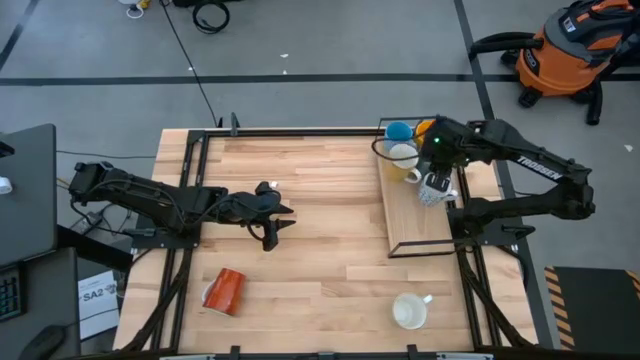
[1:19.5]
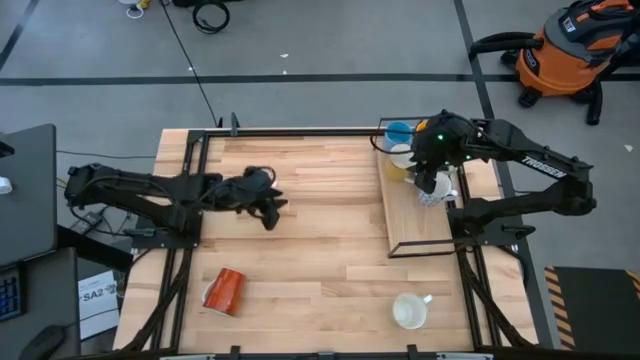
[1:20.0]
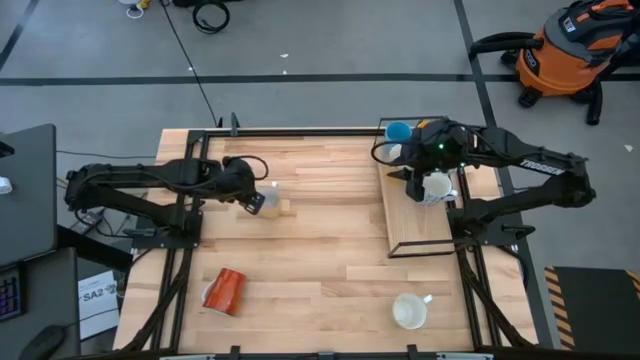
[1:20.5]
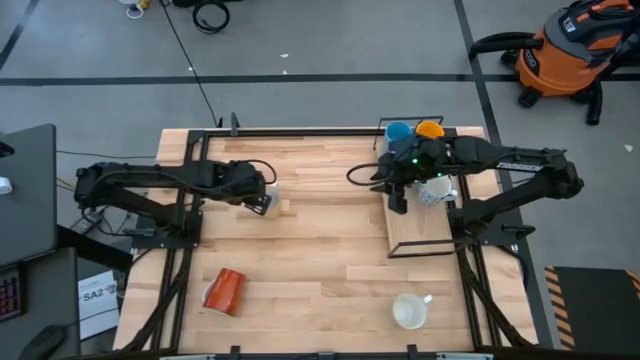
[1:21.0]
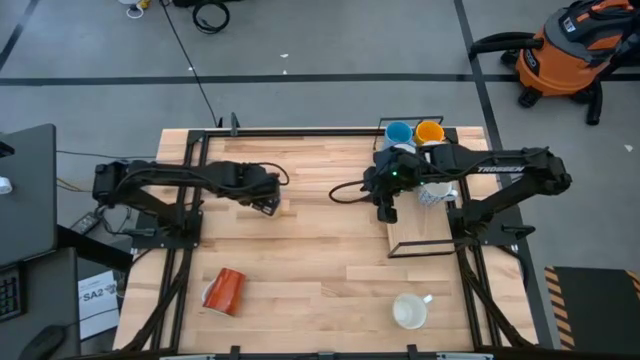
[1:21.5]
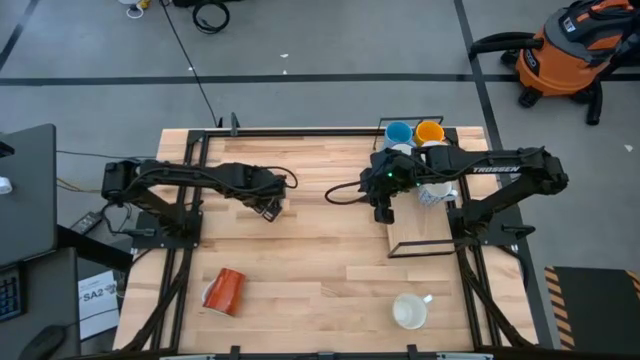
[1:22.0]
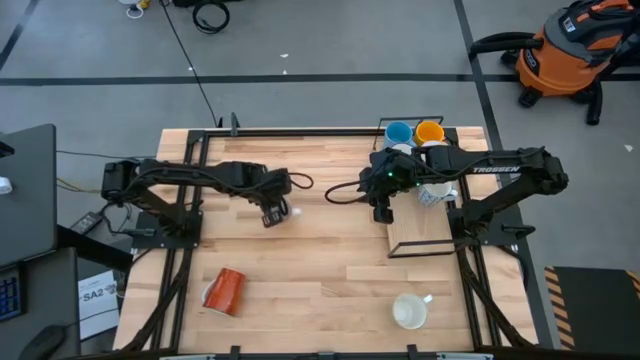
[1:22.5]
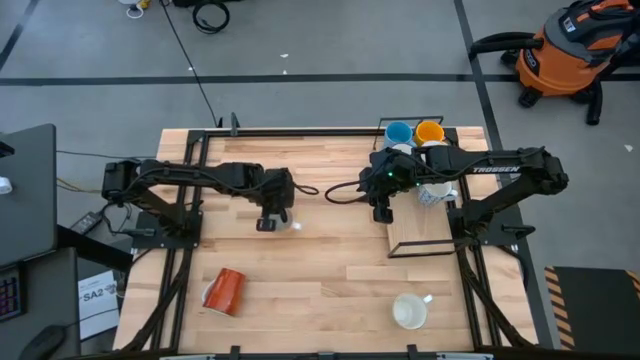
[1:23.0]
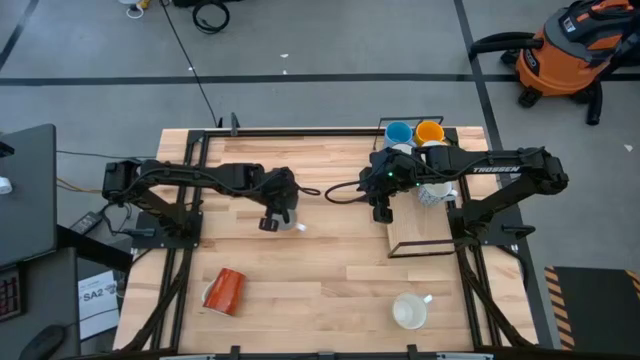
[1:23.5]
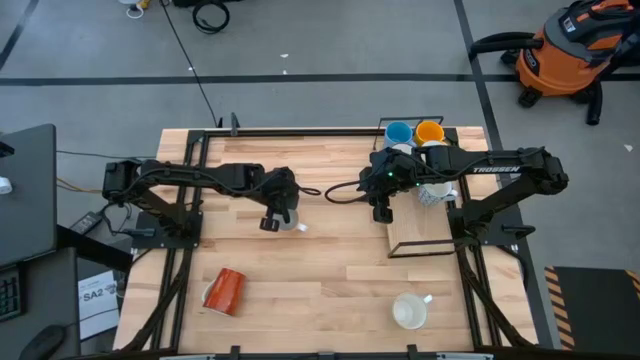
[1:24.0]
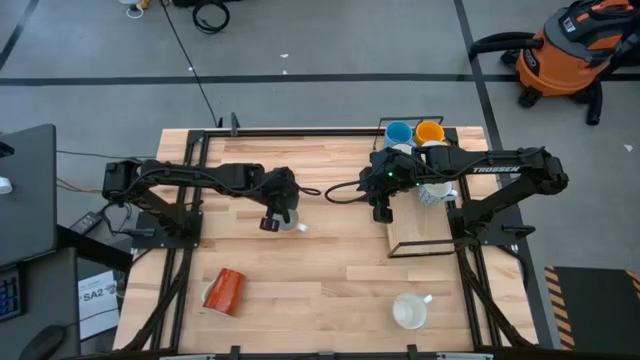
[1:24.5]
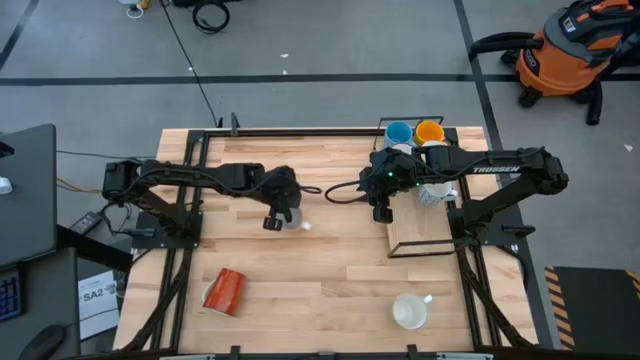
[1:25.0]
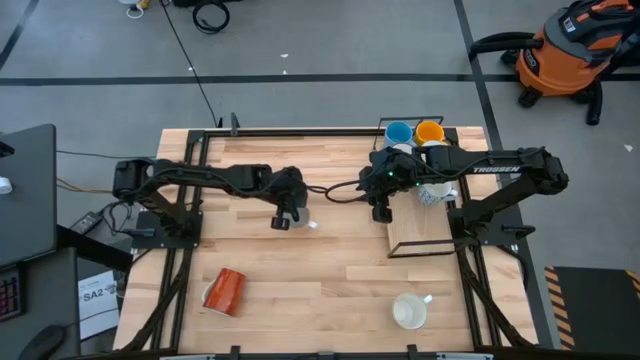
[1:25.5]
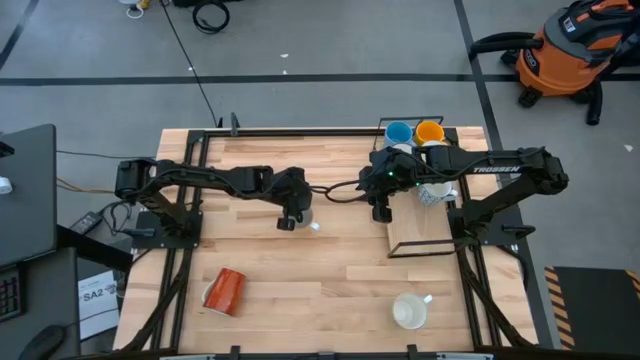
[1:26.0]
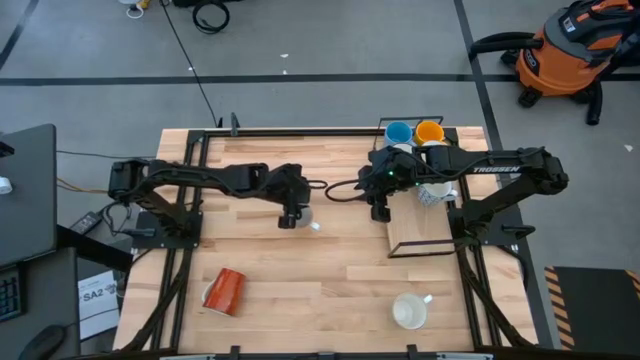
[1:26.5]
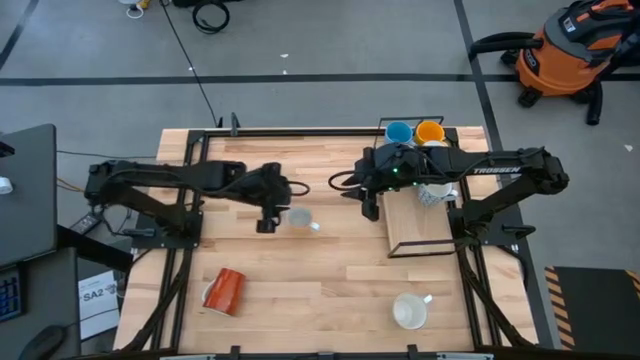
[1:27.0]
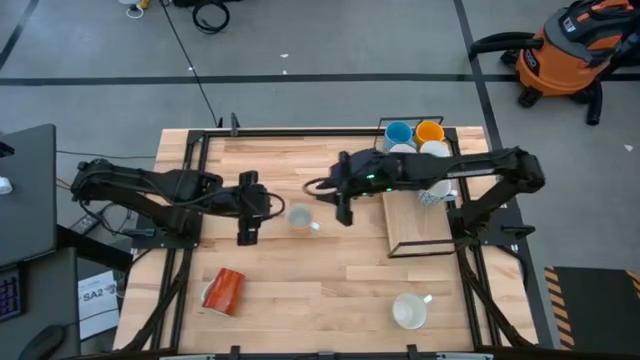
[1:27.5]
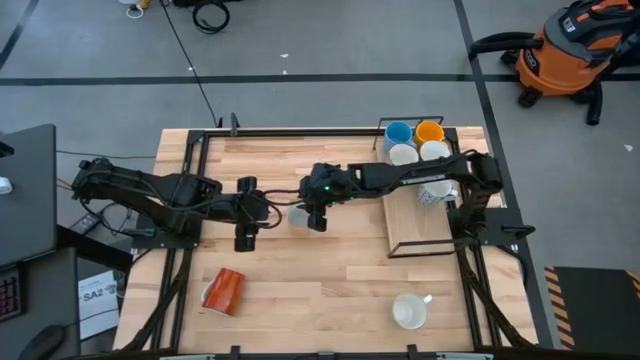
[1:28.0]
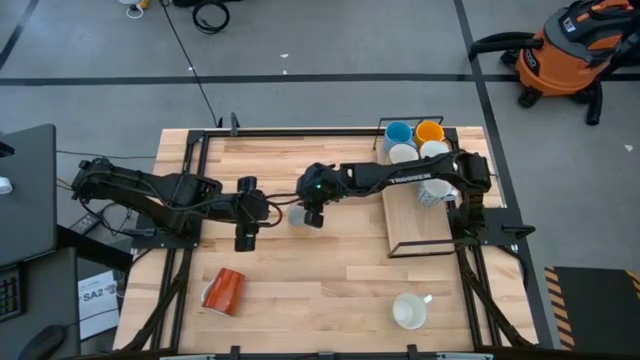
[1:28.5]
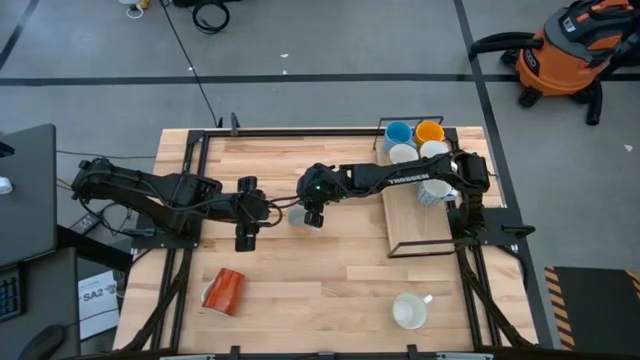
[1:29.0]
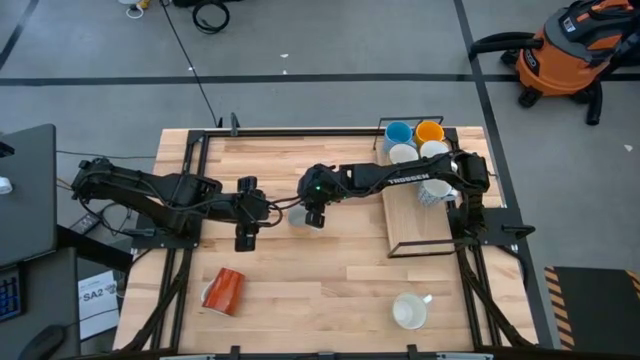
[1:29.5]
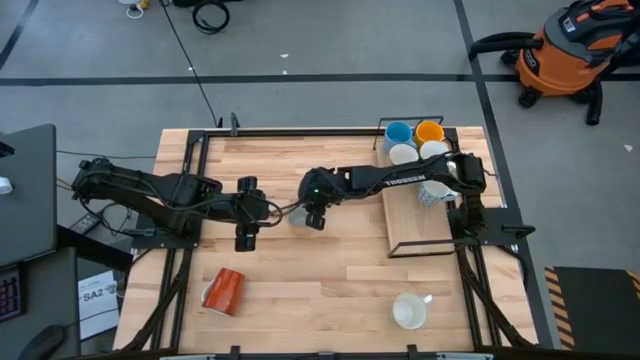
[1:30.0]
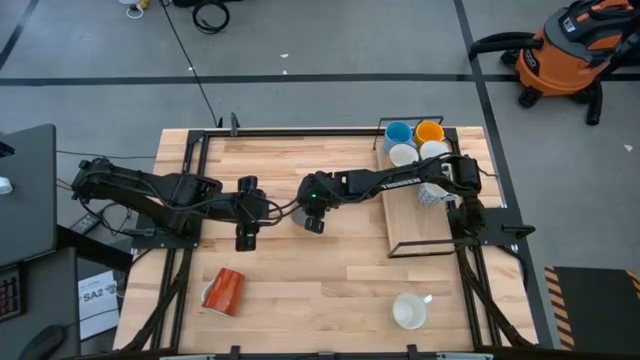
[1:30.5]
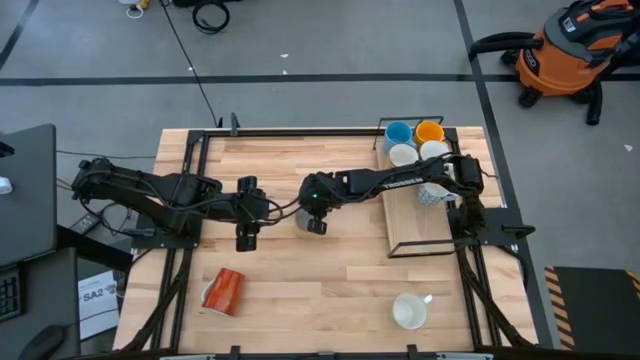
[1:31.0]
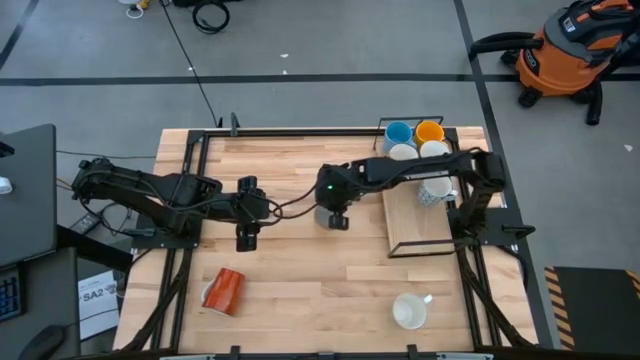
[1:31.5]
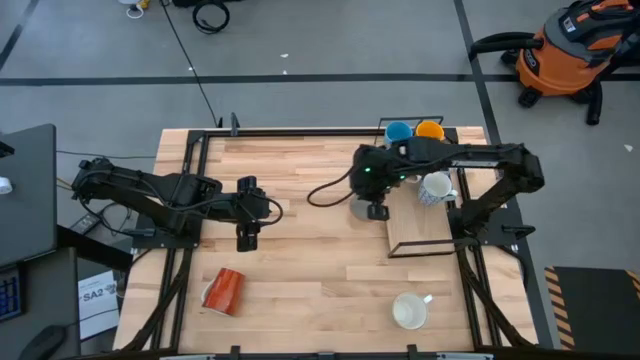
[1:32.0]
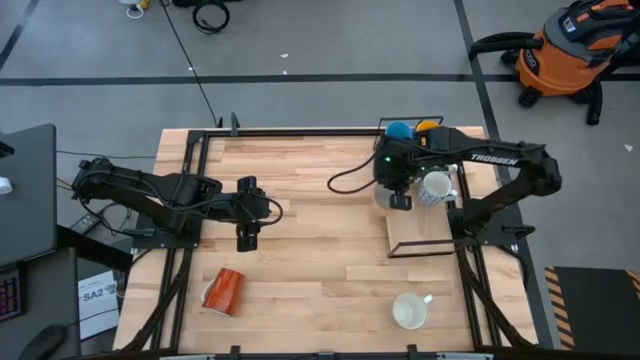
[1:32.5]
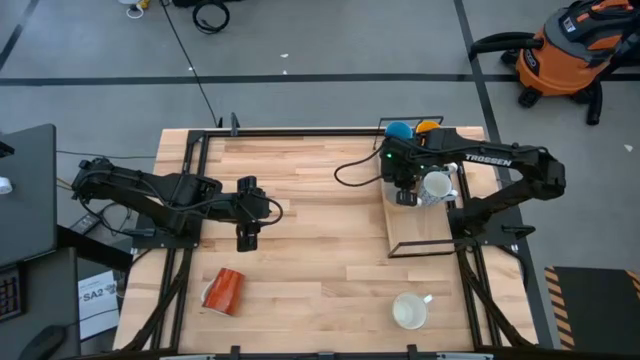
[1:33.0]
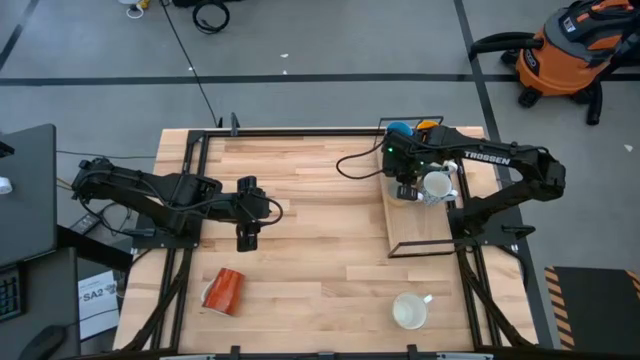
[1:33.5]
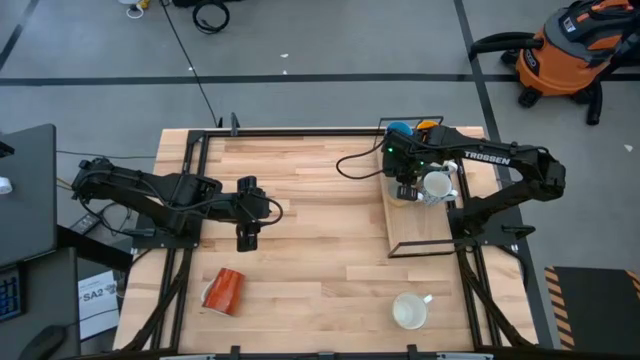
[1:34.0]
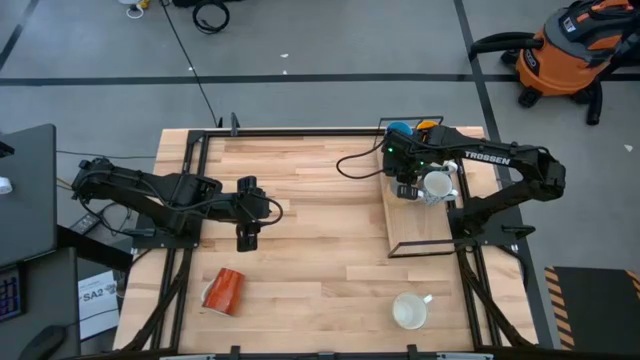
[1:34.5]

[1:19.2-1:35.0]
Task: Place coffee mugs
Put the yellow patterned mug on the shelf

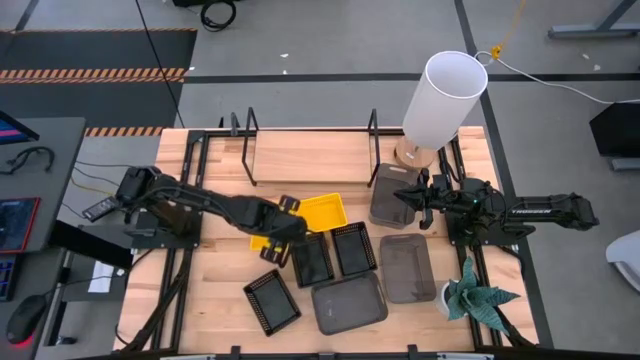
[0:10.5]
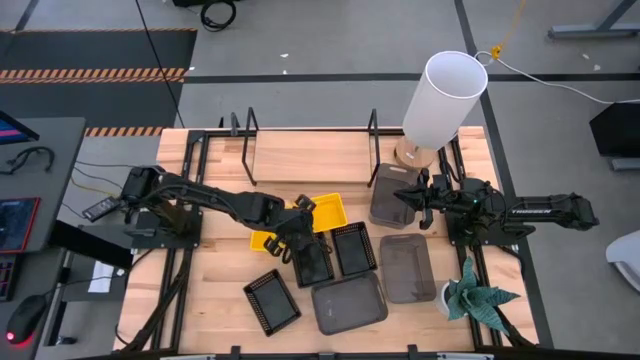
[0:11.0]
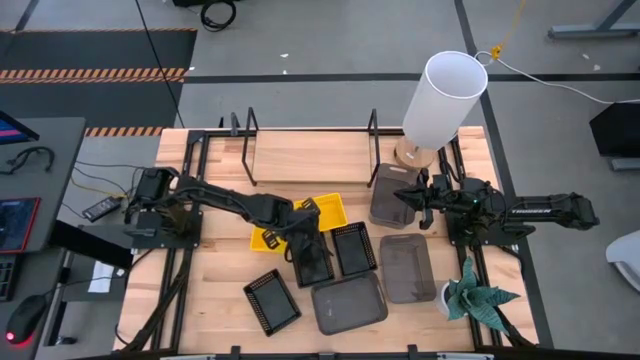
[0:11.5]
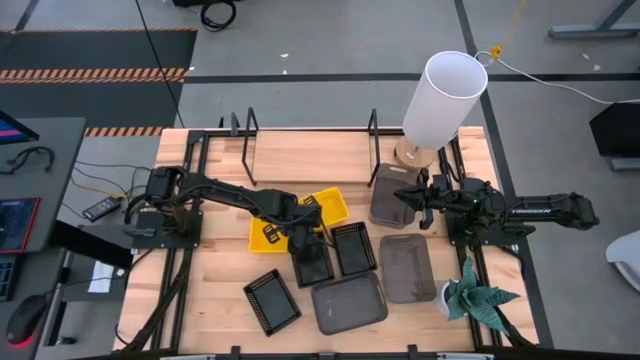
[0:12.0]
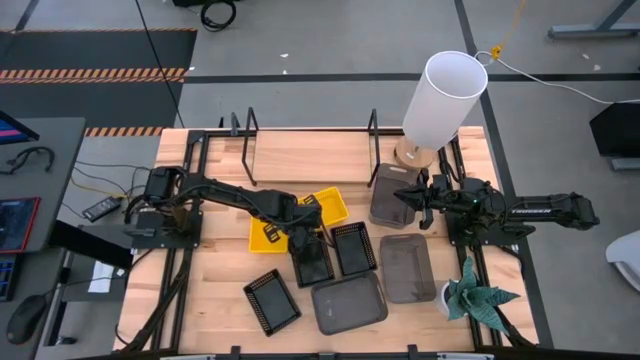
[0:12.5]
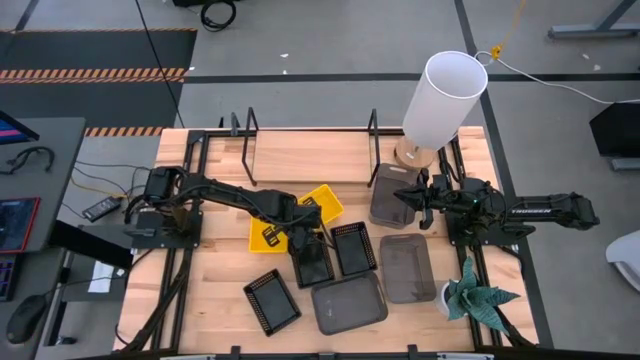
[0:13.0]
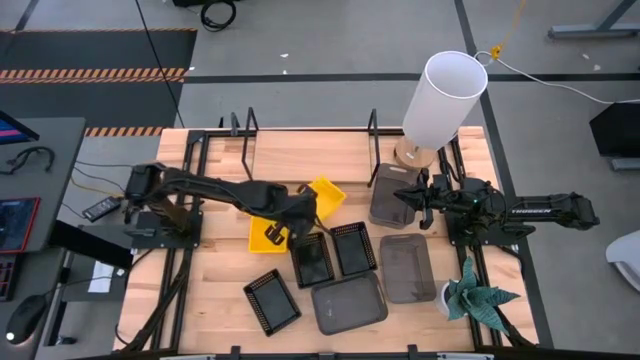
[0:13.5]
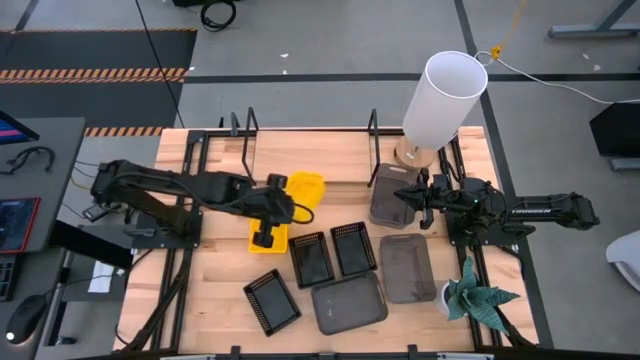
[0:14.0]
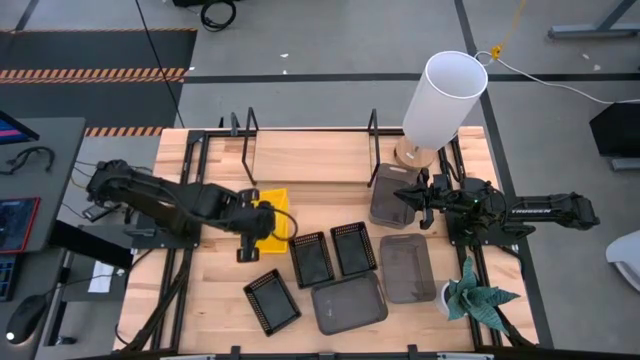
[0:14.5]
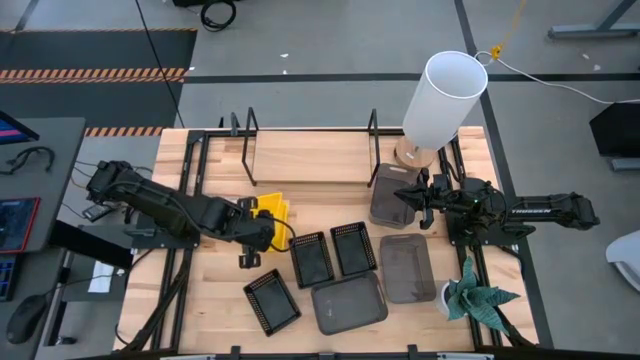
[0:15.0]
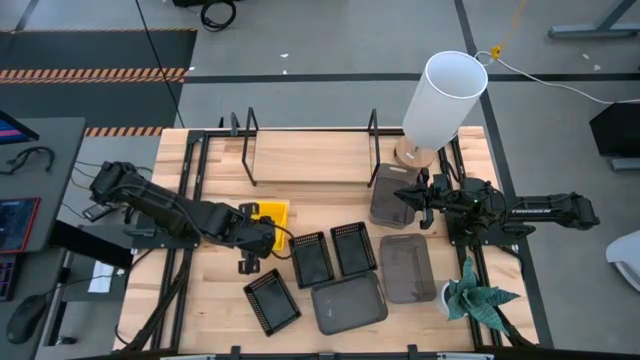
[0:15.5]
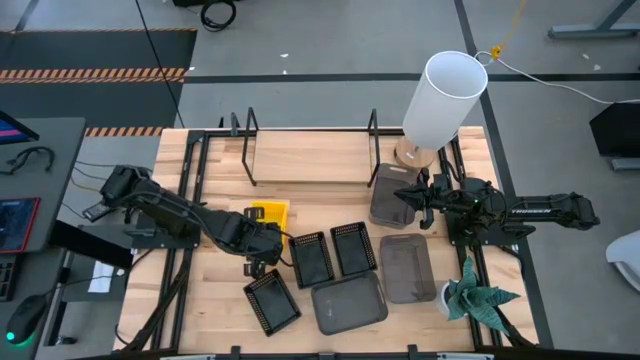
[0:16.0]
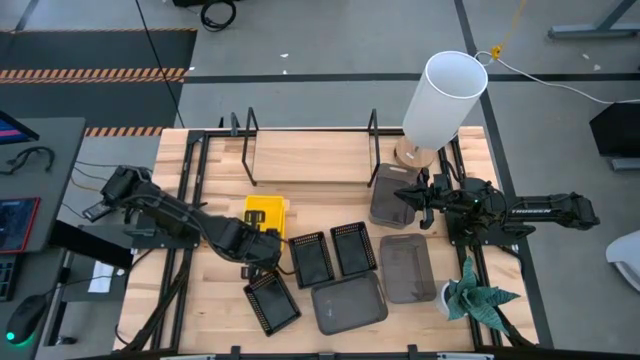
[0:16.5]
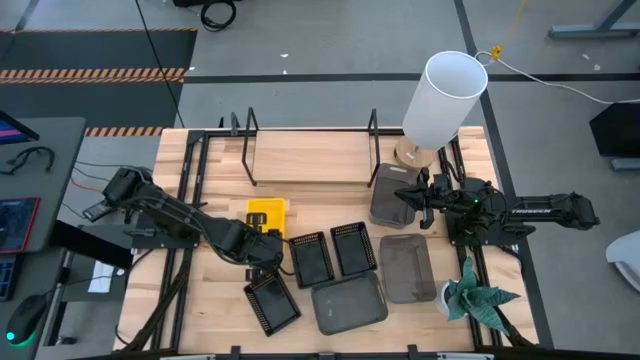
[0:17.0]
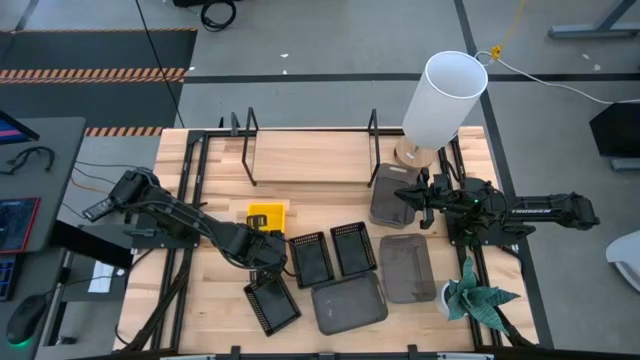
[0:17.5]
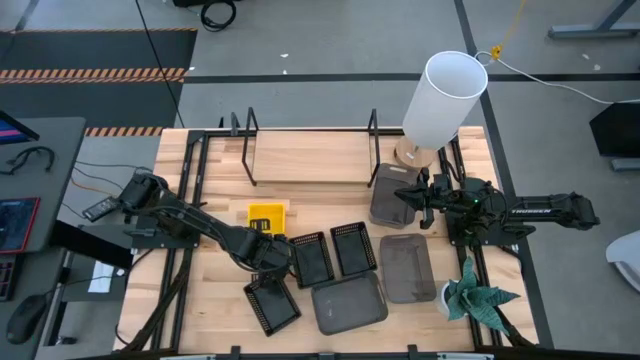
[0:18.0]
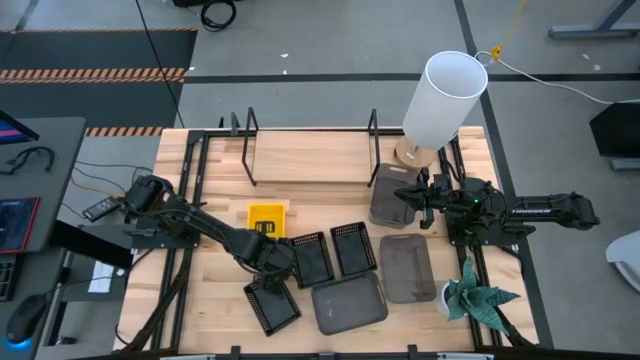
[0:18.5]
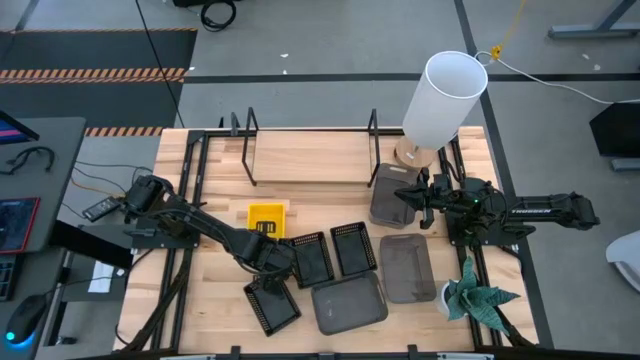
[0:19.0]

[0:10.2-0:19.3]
Task: Stack baskets on shelf by color
Stack the right yellow bin on top of the other yellow bins
